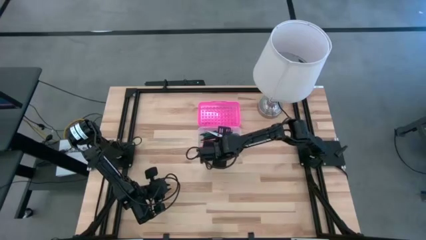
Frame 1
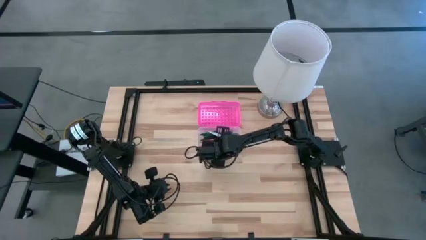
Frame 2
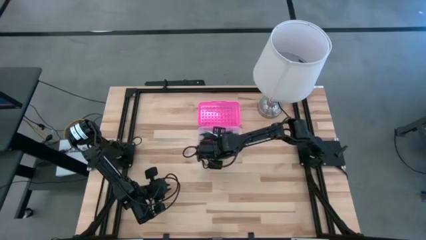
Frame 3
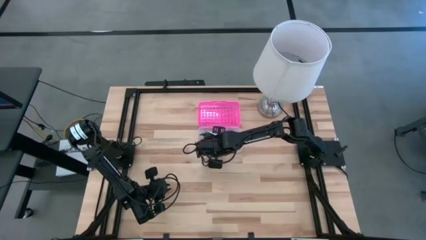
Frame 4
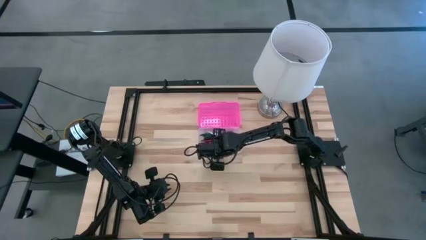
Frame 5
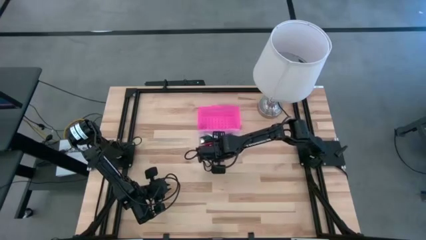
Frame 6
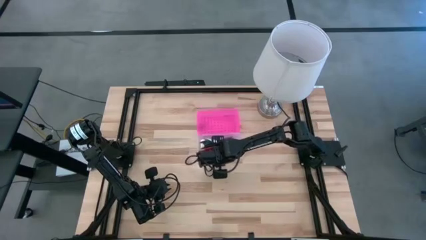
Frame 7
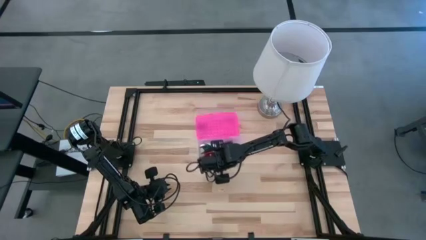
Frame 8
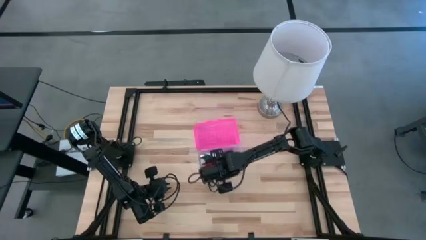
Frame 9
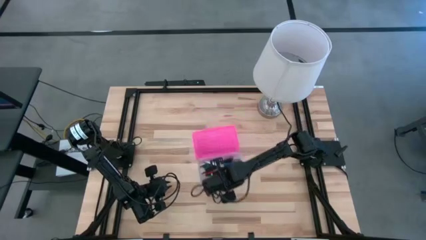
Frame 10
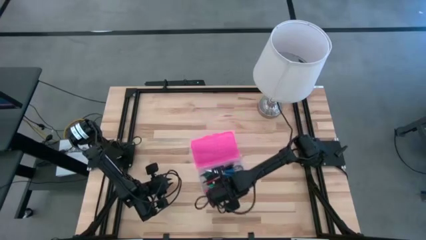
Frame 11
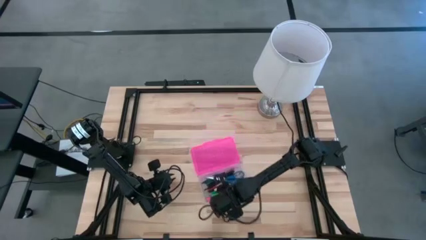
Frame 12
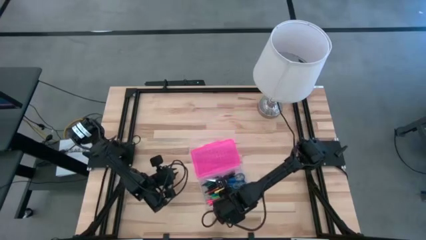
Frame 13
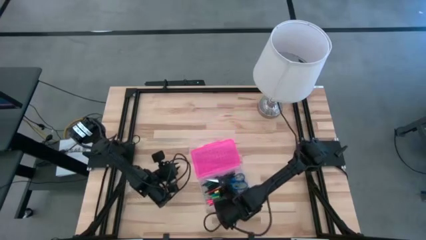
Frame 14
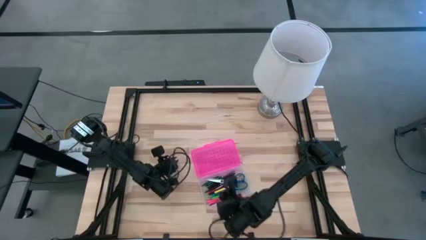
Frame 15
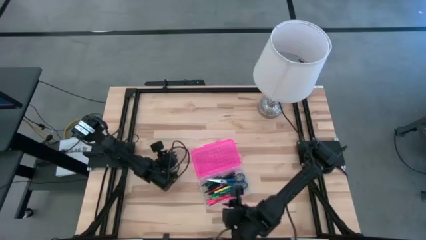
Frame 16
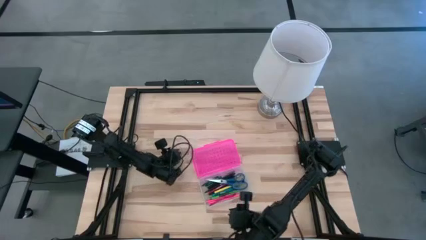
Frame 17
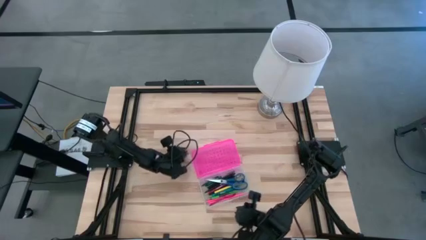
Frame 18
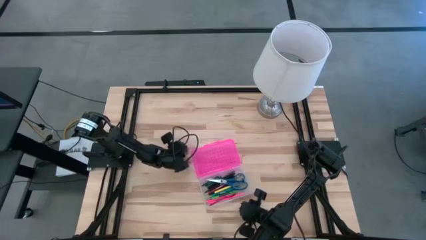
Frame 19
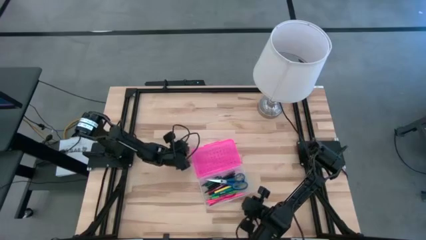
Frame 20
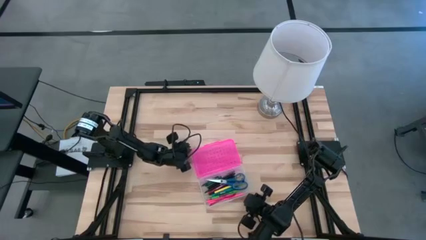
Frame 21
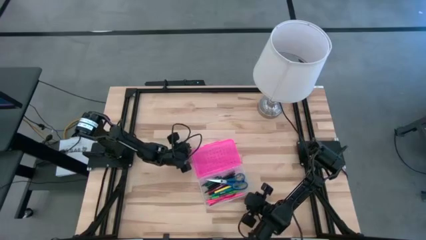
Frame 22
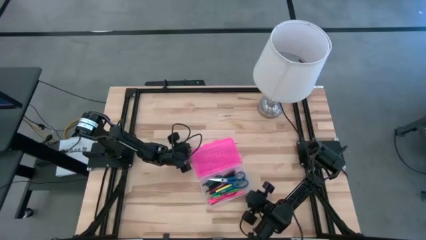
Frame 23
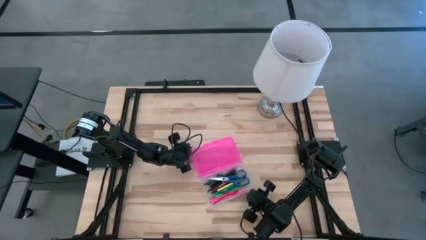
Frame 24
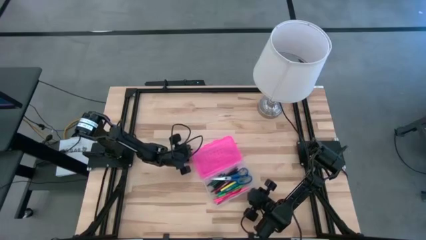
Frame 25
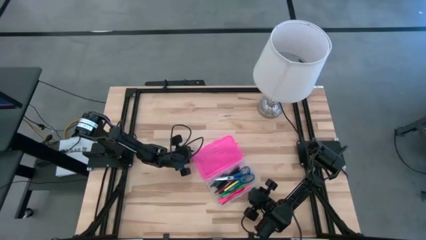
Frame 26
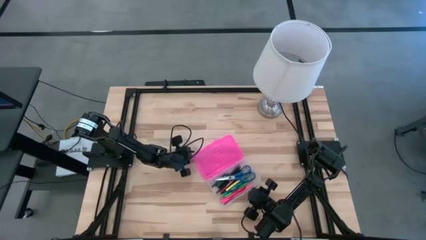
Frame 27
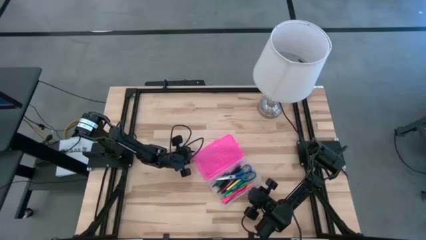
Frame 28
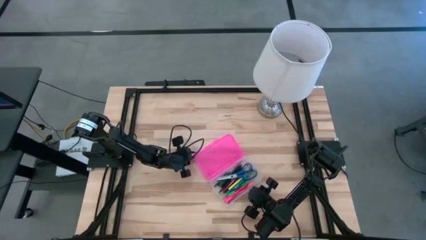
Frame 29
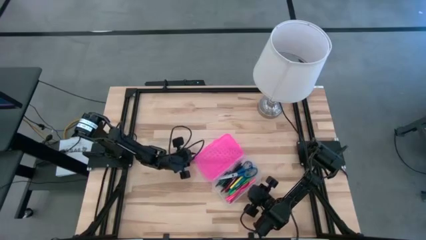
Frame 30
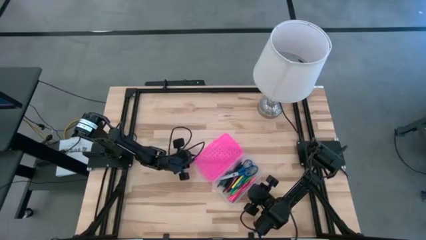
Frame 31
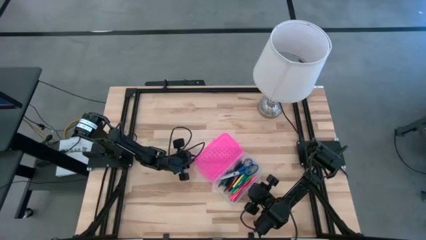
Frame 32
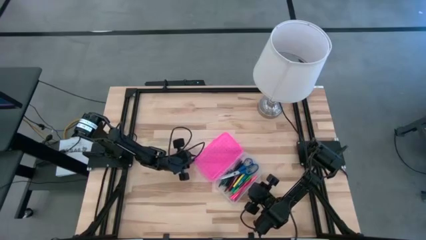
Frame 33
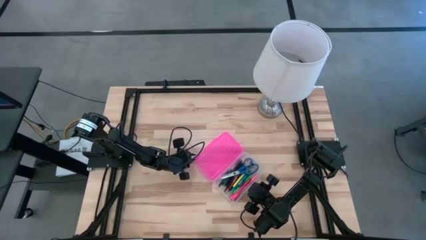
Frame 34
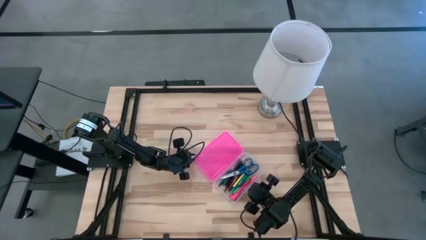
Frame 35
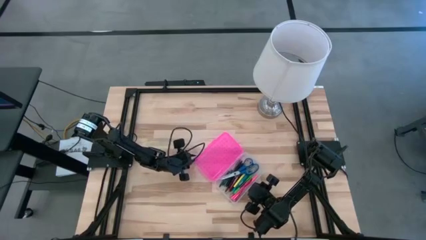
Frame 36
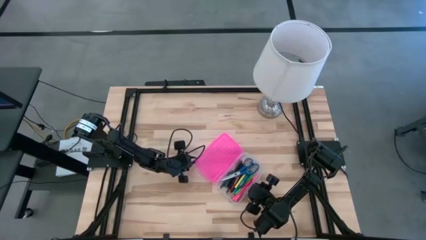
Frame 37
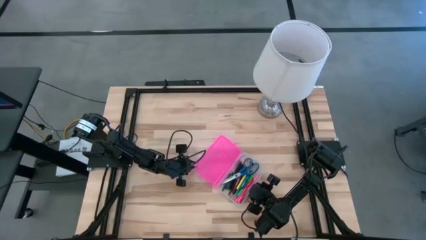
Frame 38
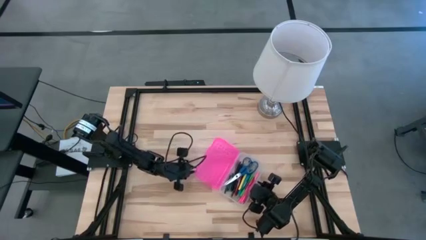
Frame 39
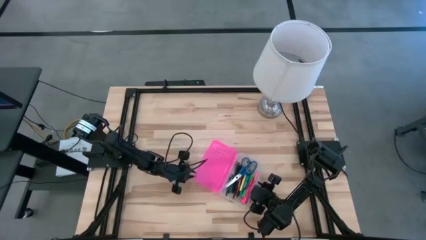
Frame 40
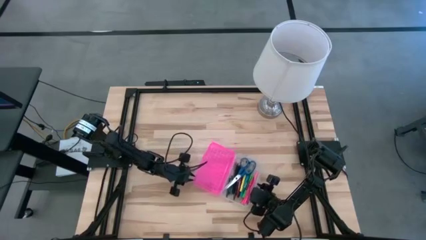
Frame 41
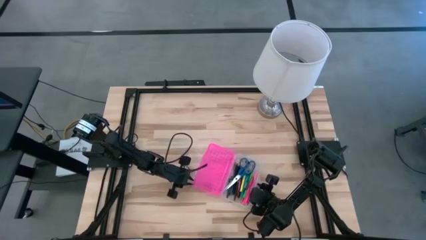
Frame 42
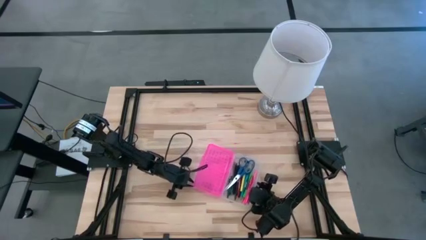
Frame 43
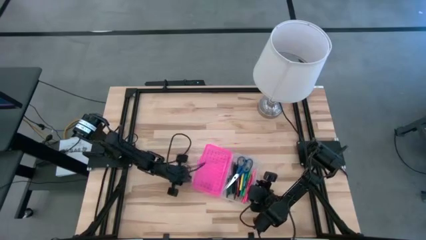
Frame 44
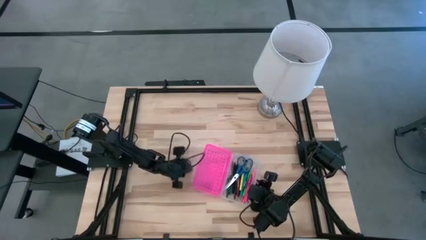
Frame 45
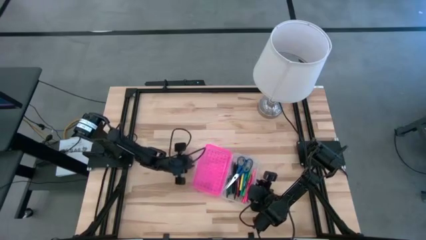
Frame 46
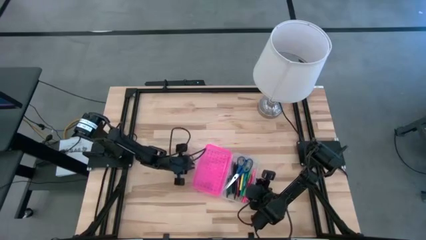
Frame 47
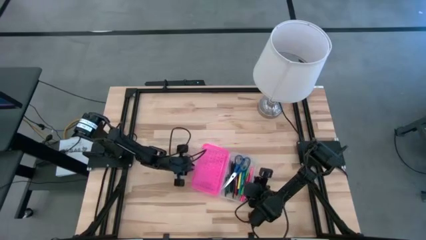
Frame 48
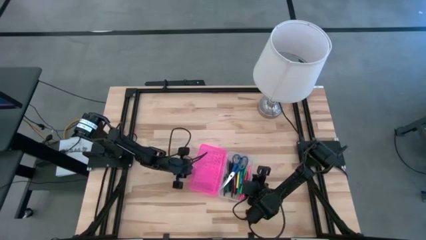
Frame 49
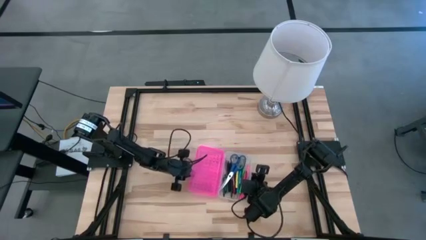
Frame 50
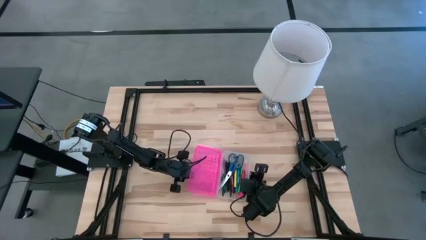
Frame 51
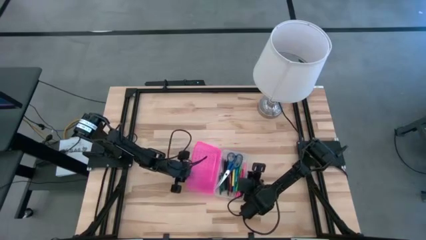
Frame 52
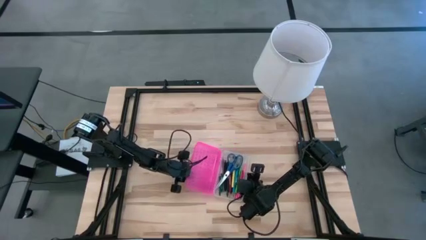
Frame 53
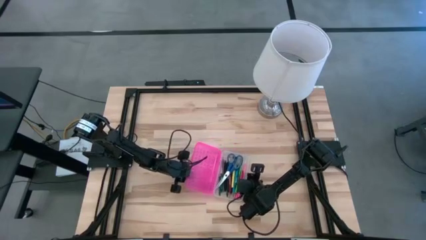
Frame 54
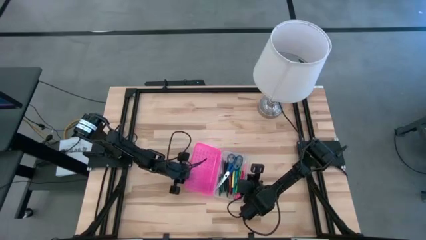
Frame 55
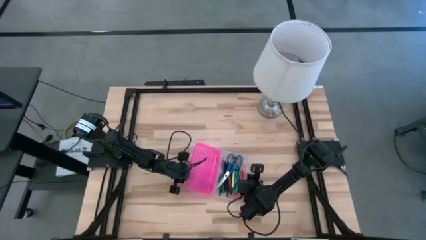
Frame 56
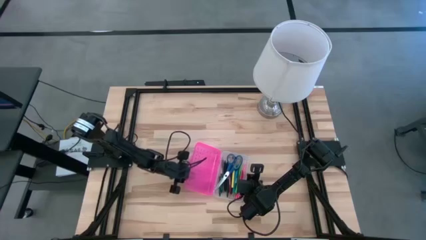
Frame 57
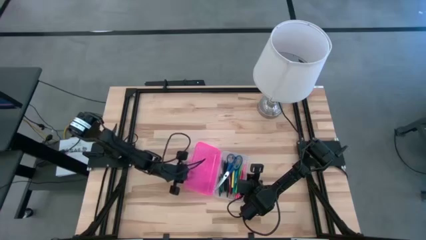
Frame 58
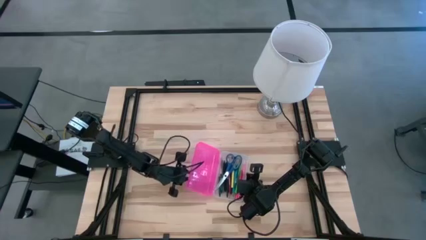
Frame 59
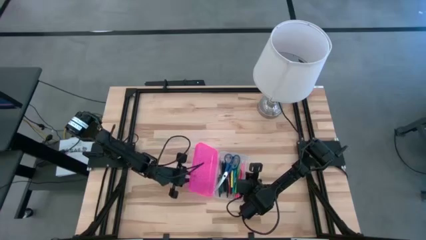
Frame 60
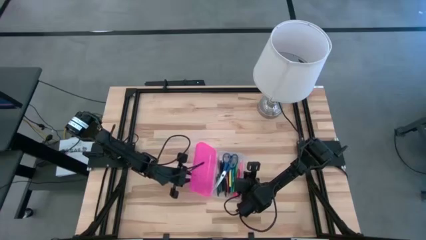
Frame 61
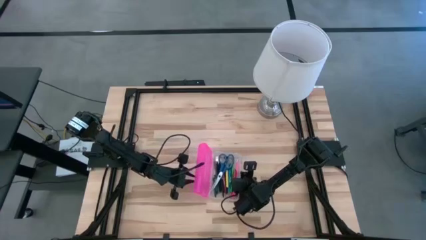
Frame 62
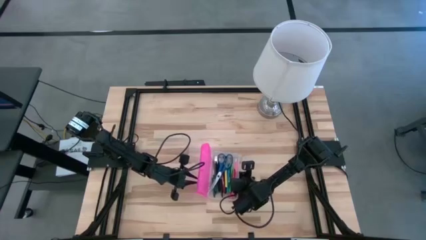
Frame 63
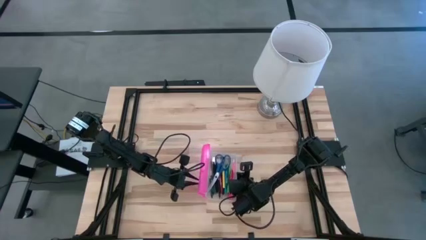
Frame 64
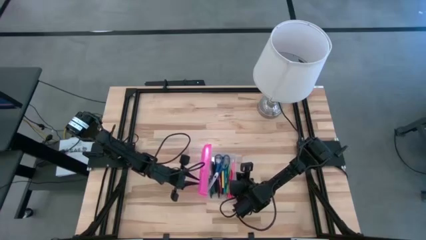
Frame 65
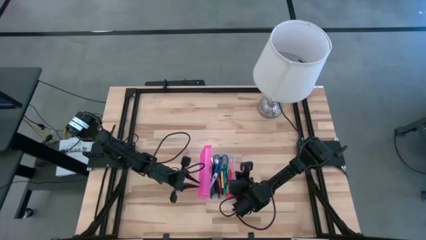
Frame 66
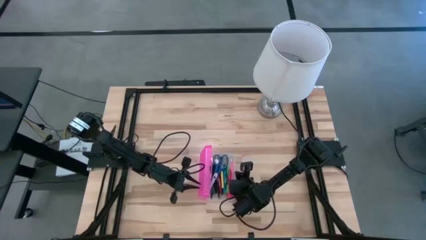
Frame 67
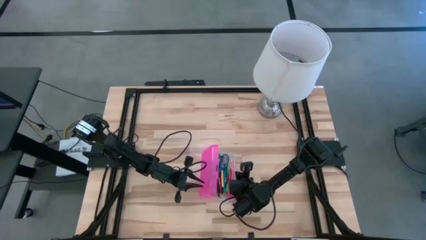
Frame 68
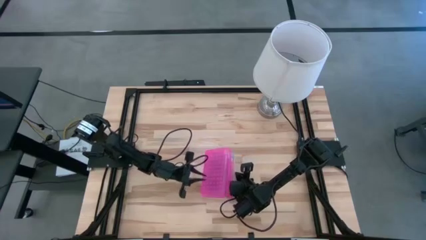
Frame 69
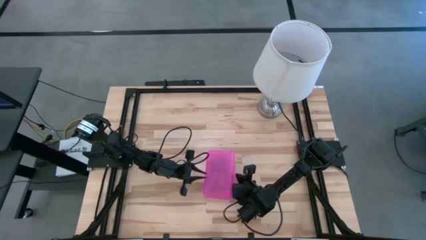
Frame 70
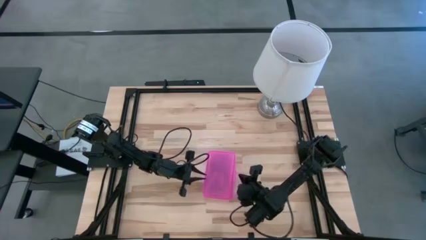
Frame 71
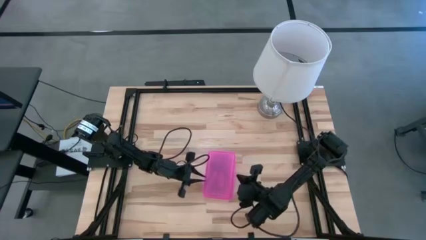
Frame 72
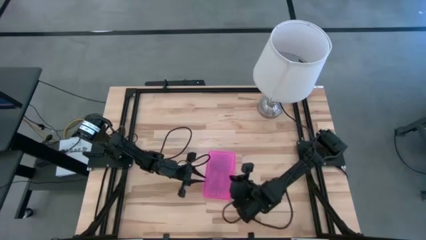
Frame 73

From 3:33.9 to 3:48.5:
Task: Pick & place school supplies into a supply box
Return to Home Position

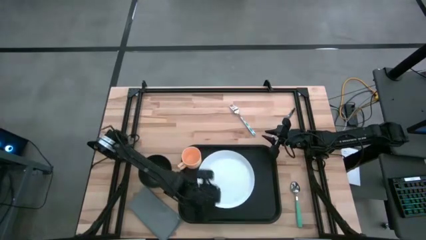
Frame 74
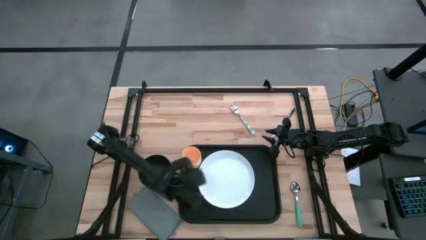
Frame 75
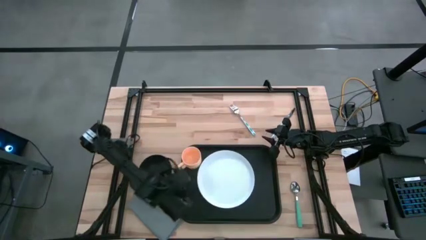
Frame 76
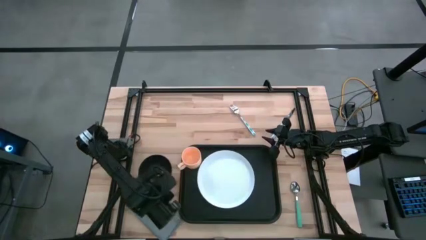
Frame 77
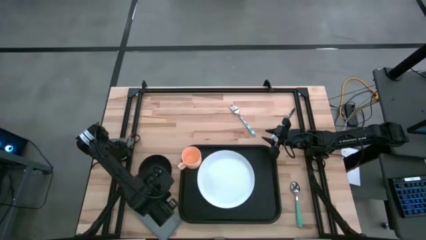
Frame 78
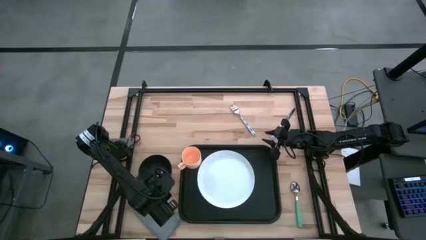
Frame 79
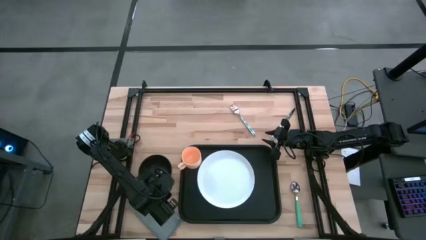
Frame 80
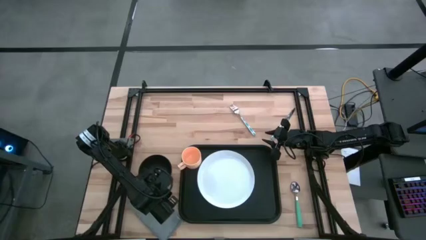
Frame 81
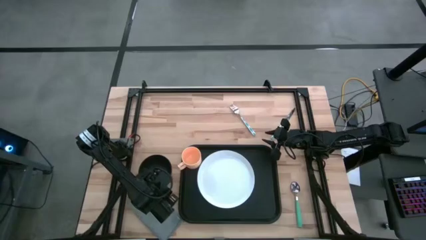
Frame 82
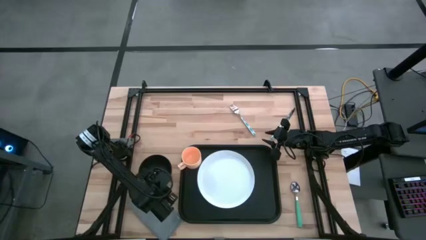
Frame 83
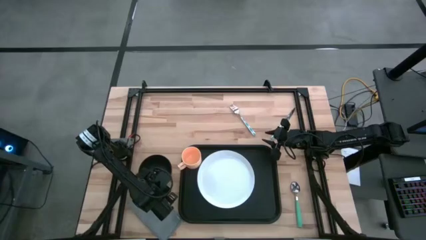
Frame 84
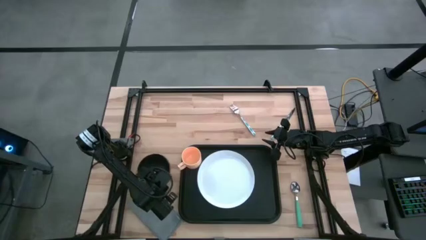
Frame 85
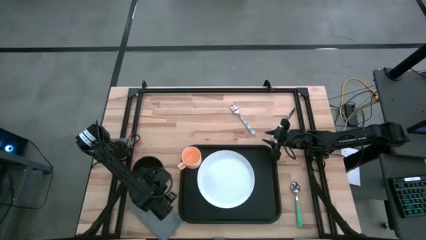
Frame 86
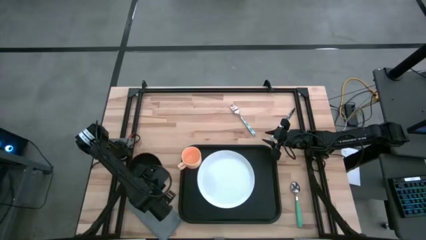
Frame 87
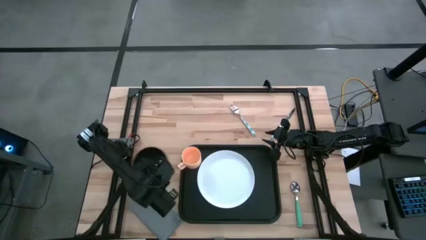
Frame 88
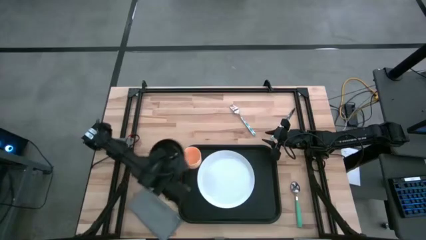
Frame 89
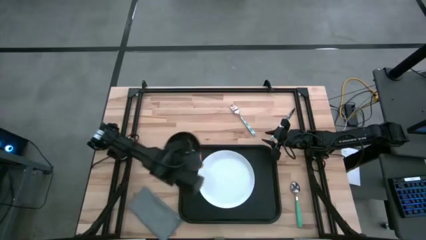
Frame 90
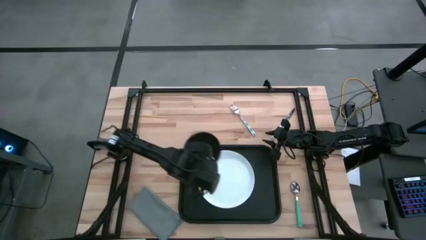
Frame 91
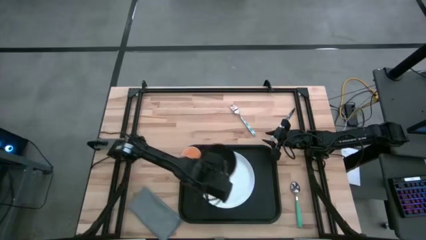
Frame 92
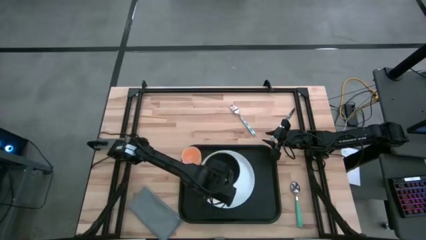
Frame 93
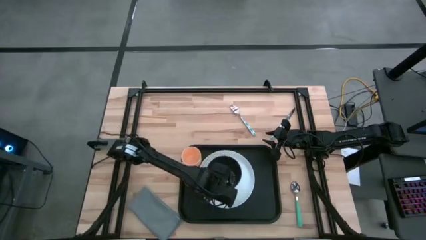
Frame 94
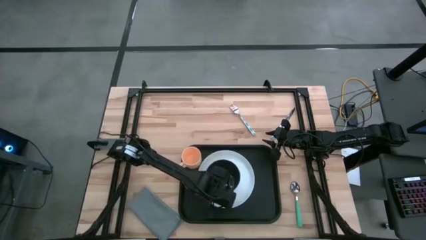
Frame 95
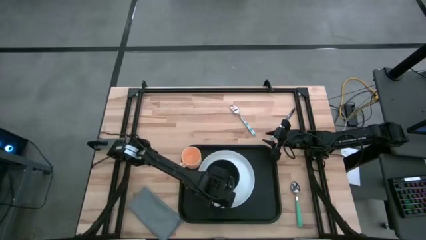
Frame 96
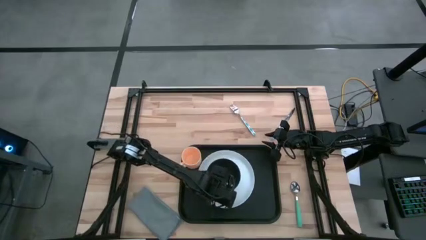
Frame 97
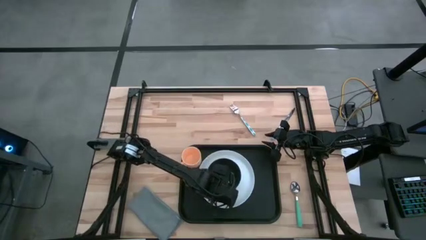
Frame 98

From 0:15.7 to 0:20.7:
Task: Set up tray
Put the black bowl on the white plate
